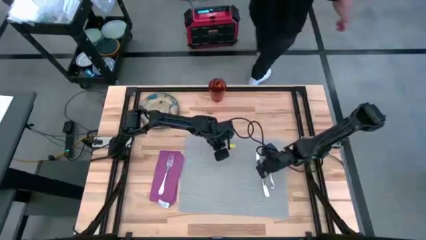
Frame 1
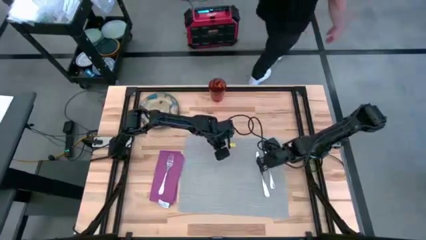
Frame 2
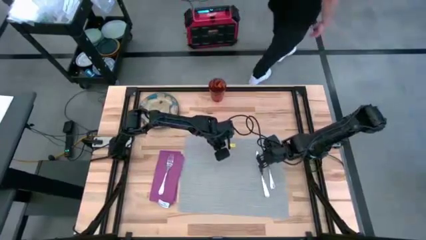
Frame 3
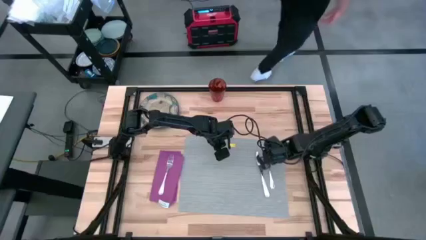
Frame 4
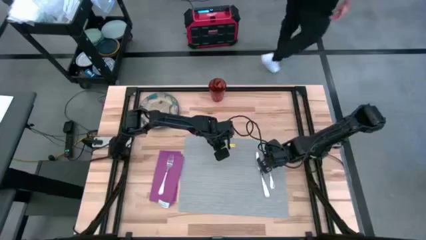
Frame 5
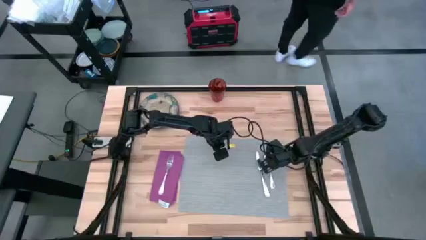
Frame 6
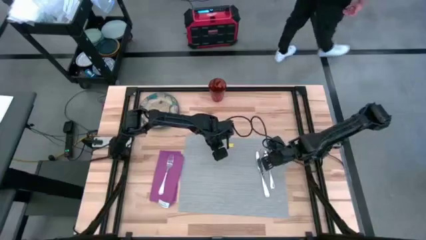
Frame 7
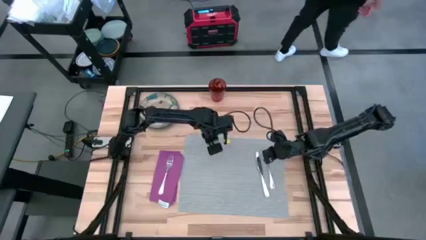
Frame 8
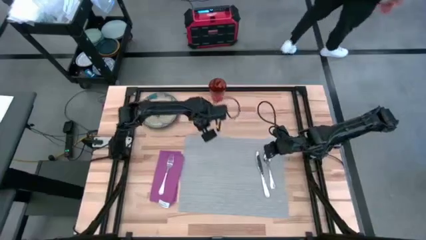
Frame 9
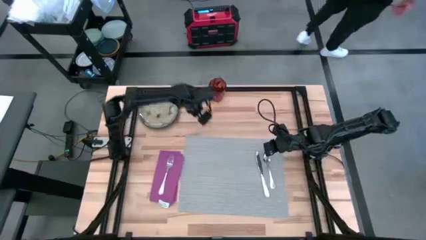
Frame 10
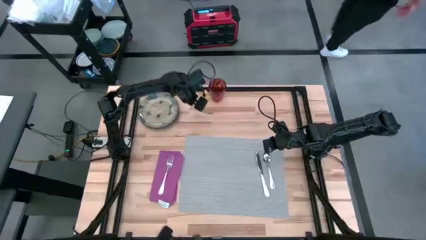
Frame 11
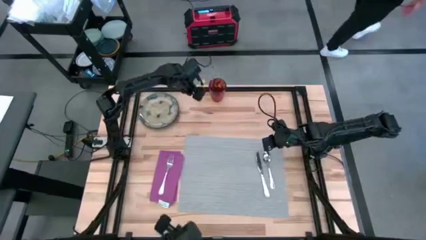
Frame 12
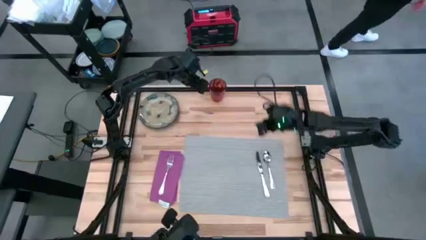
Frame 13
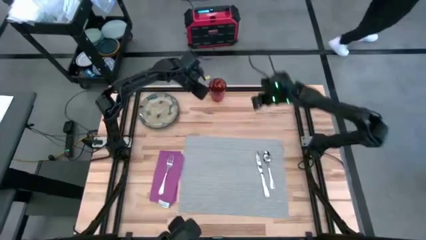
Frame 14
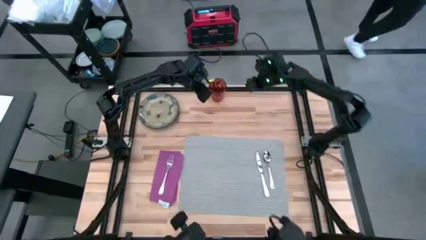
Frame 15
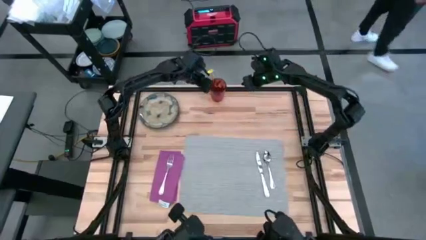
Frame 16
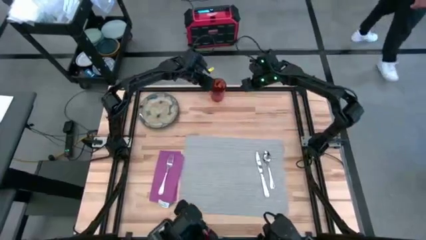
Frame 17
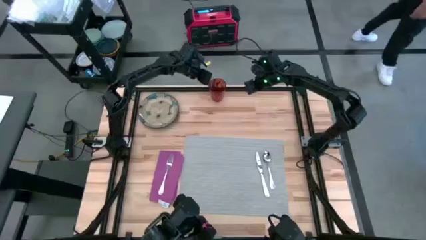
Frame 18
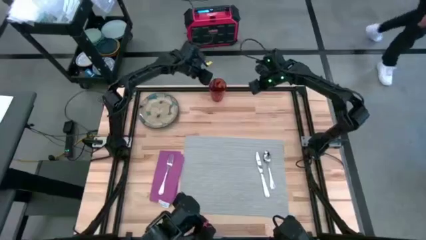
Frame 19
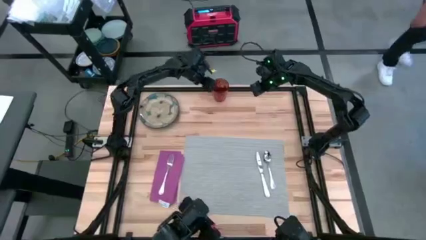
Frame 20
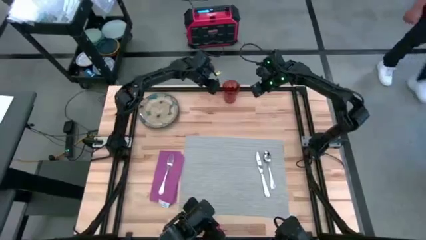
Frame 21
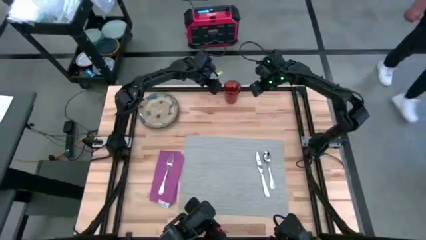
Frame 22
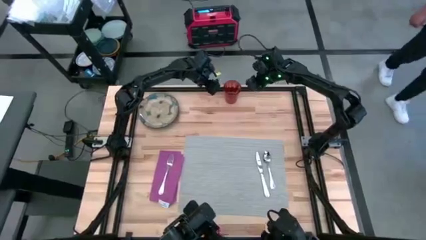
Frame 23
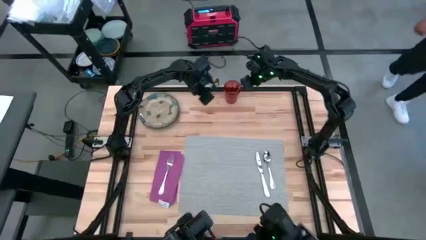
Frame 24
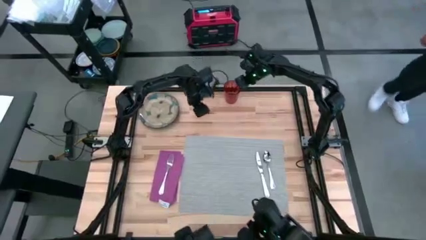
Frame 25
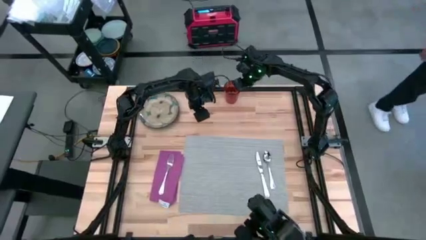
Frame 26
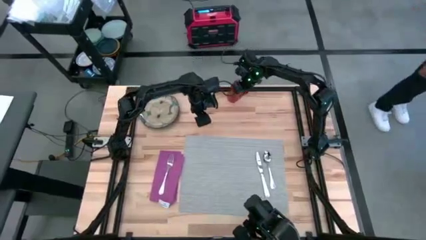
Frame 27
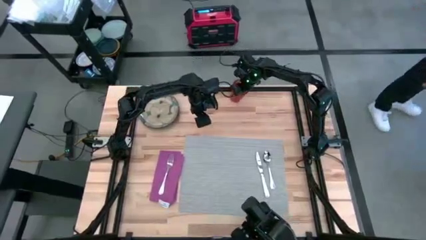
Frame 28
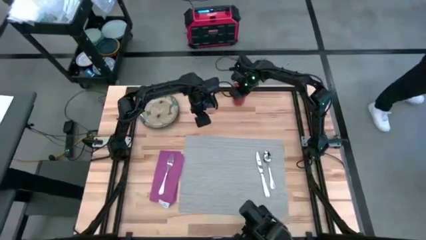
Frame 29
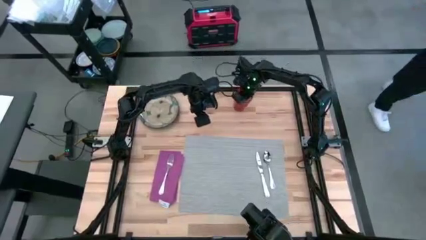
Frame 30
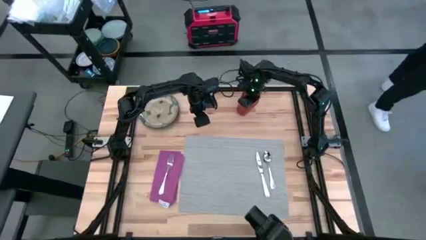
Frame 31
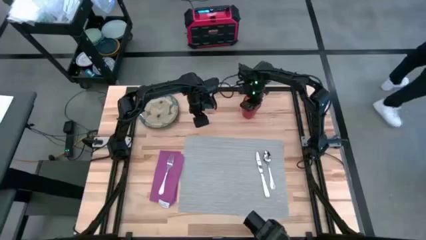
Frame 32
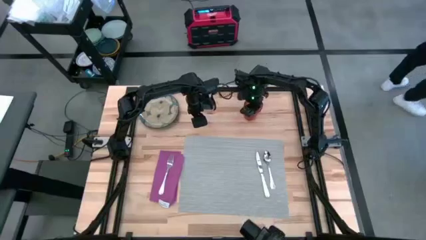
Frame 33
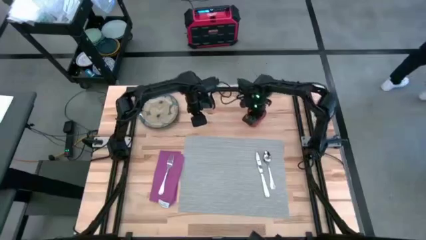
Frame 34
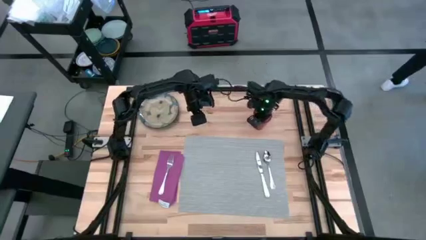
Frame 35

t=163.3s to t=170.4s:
Task: Set table place
Move the glass cup to the top right of the table

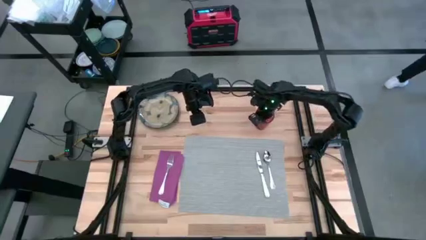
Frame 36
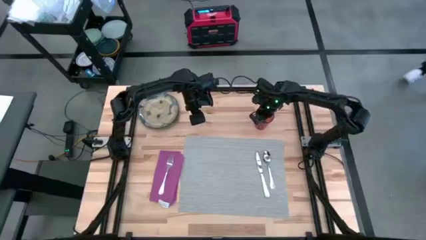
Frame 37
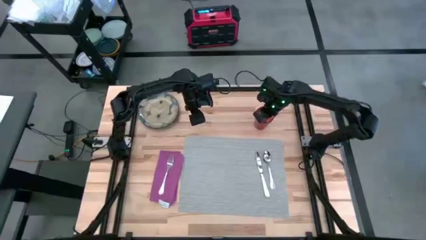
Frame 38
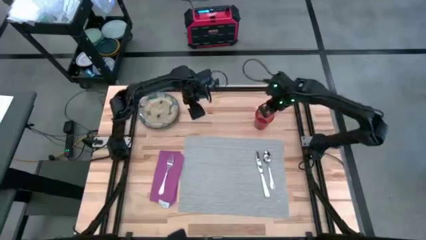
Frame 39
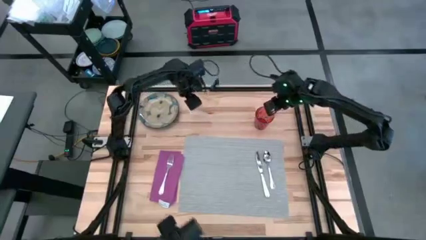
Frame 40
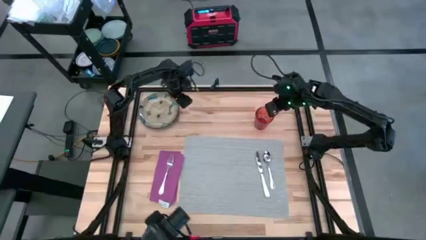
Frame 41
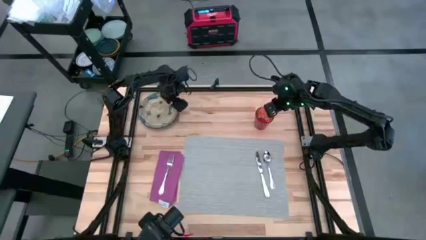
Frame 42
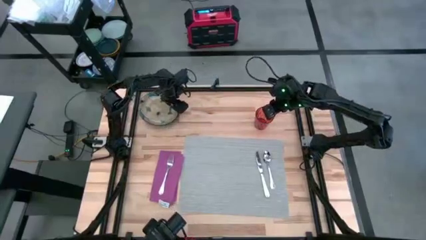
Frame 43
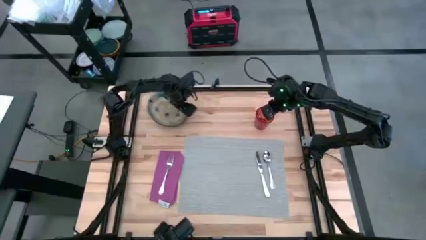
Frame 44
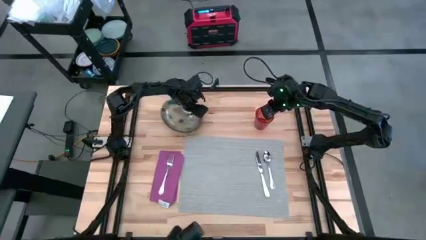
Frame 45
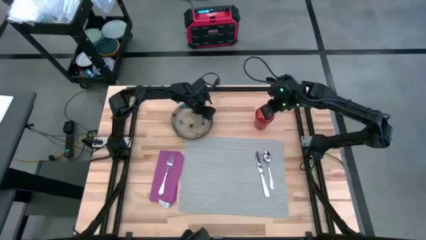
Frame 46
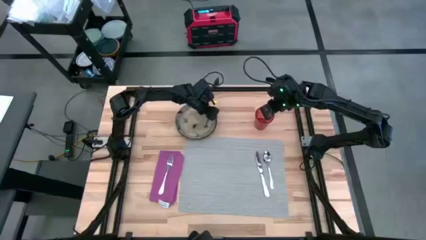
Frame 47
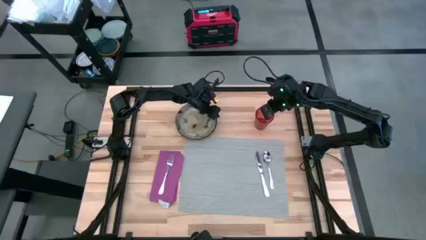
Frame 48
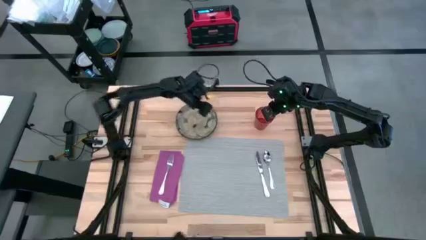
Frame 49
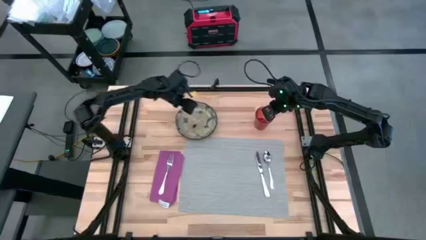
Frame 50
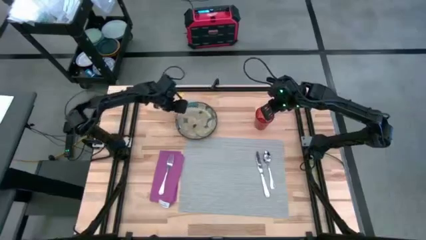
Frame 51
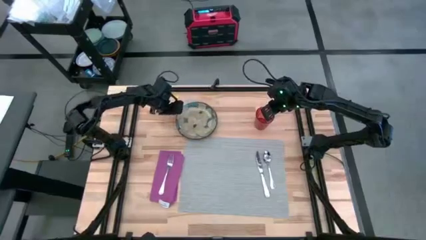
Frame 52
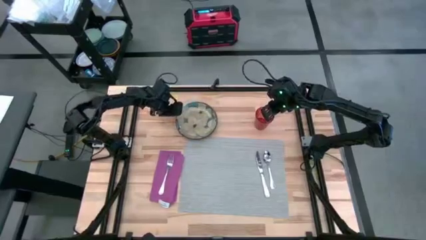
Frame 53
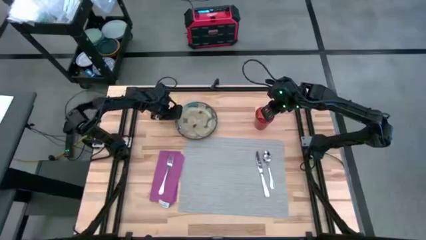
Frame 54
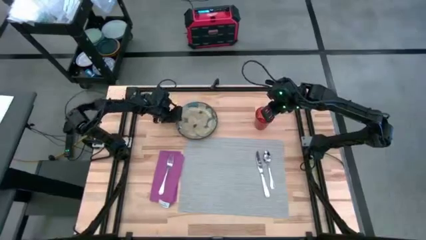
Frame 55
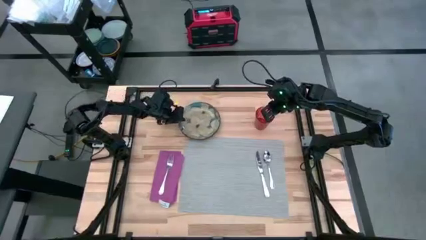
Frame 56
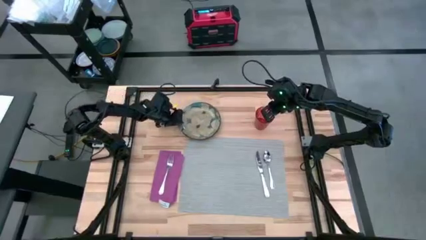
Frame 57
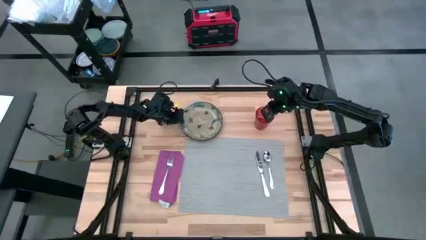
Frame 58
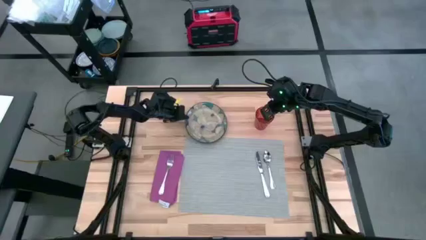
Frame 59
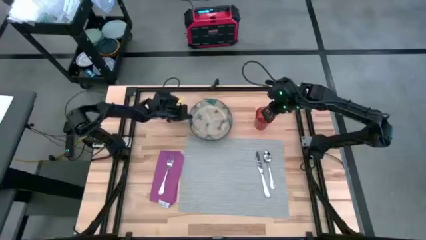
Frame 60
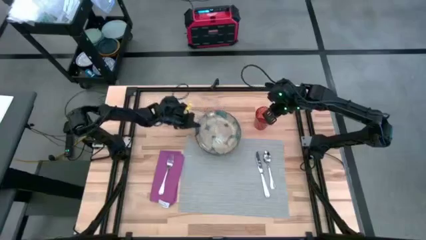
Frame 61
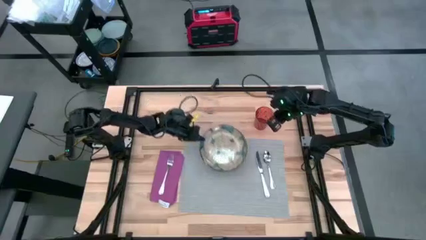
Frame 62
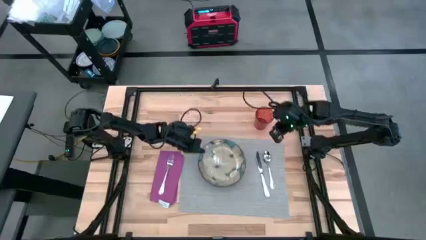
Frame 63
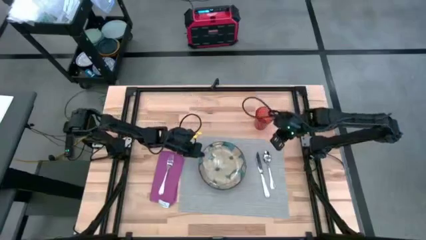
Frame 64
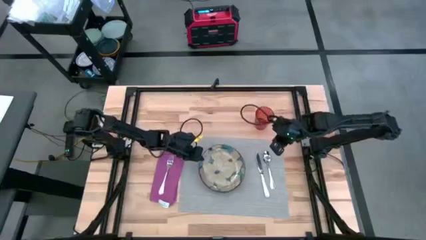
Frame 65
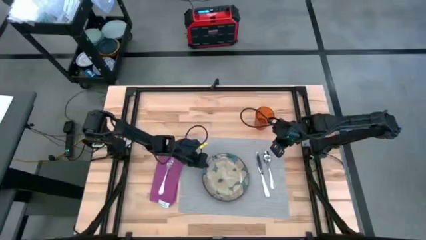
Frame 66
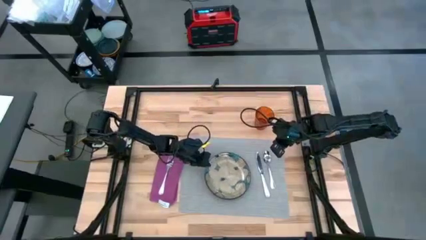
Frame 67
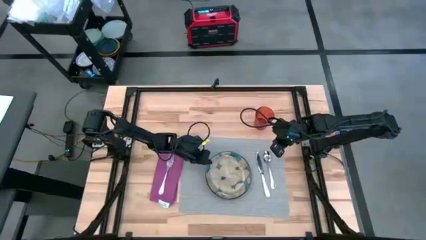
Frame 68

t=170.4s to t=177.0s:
Put the plate on top of the table mat

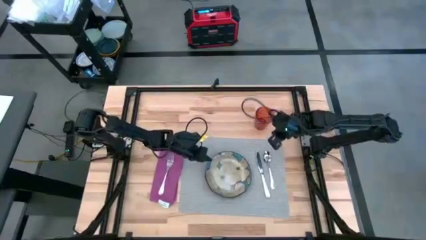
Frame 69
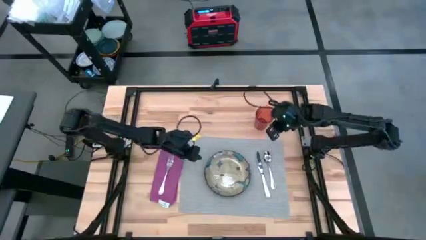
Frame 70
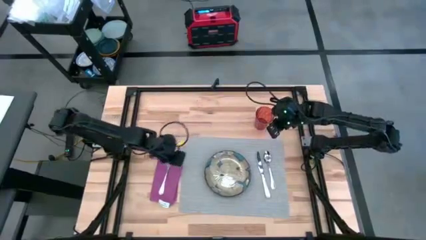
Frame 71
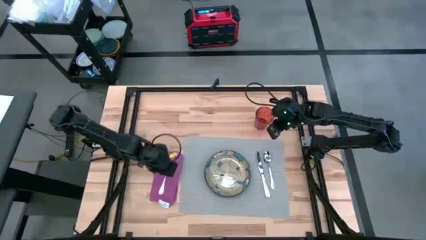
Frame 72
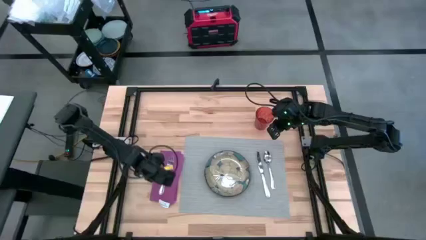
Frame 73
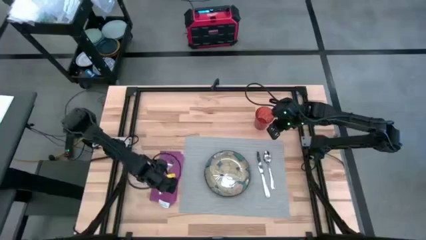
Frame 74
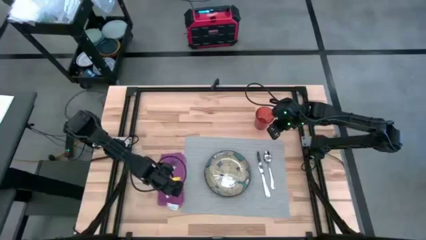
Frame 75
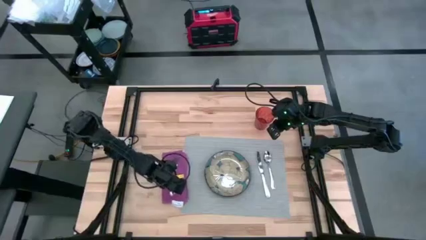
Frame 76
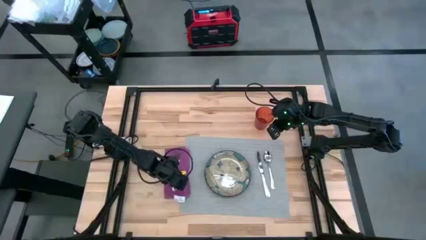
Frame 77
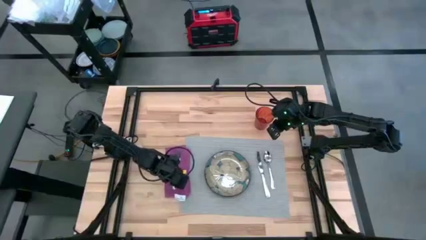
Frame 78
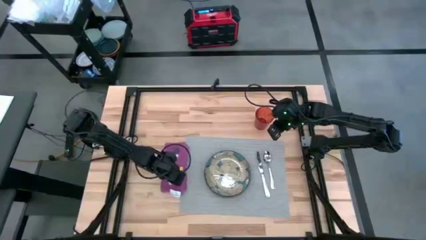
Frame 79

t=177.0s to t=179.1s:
Adjust the purple table napkin to the left side of the table mat

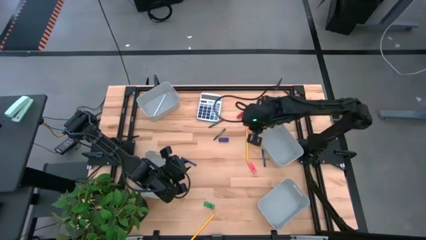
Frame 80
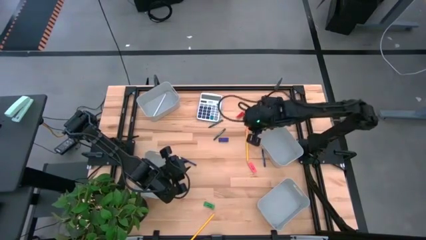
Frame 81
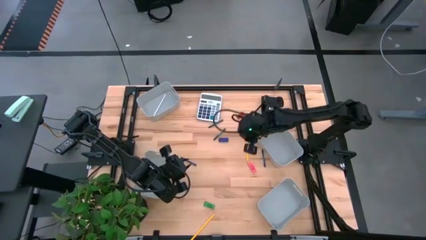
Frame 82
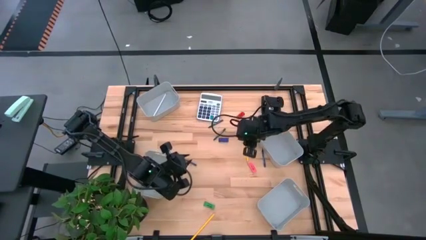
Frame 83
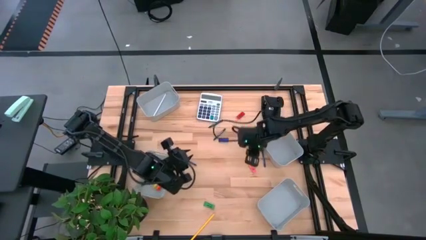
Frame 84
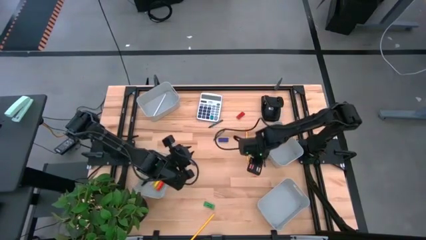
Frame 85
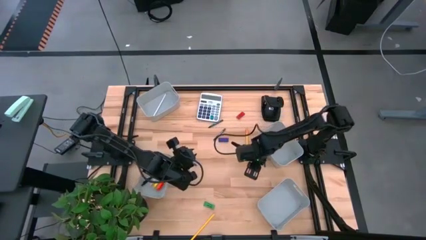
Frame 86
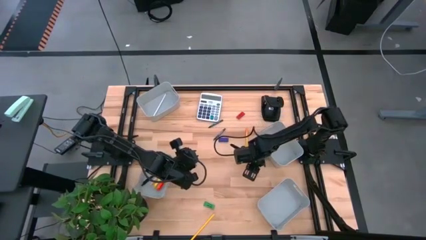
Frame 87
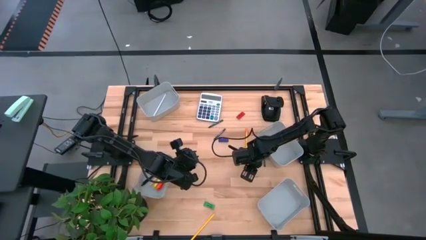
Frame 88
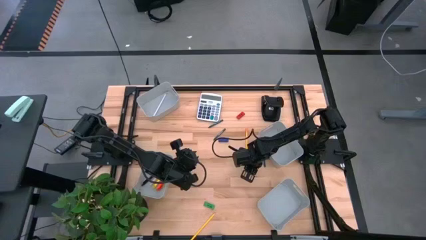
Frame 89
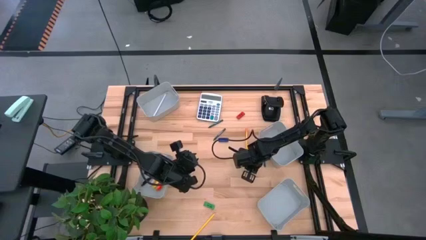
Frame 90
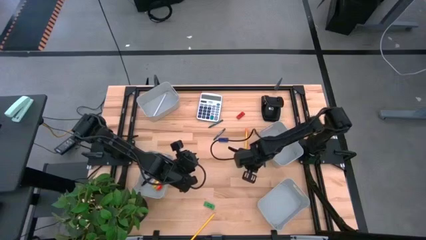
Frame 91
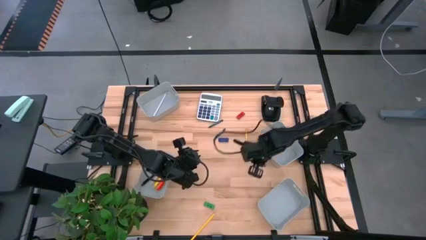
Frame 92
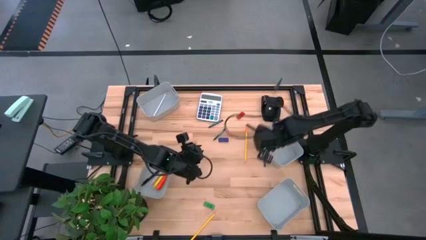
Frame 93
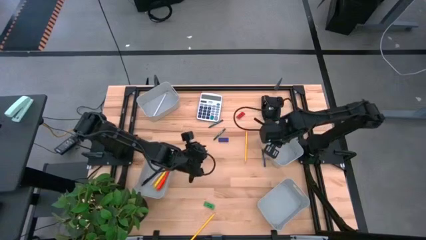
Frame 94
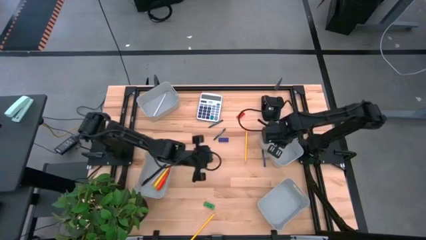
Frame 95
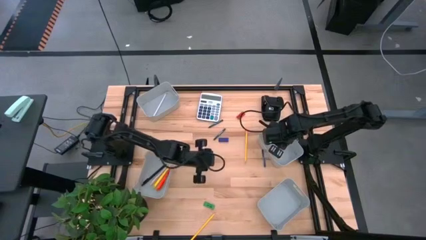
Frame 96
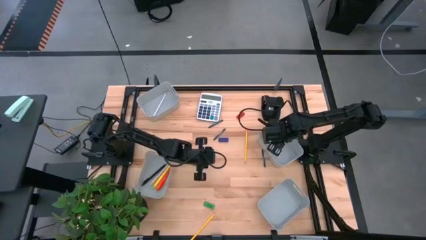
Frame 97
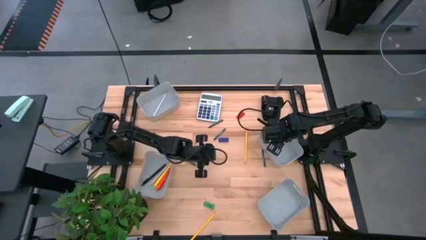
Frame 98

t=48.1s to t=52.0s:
Task: Sort crayons/erasers/pens/pencils in bins
Put the pink eraser into the top left gray bin
